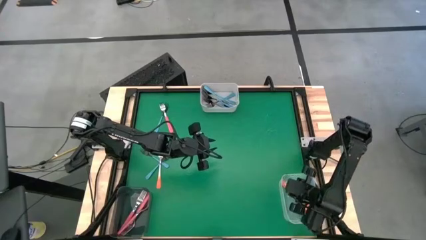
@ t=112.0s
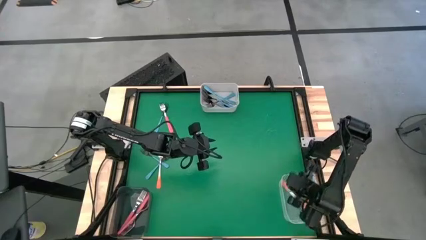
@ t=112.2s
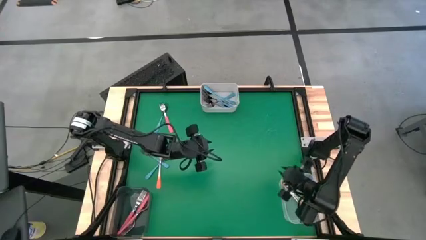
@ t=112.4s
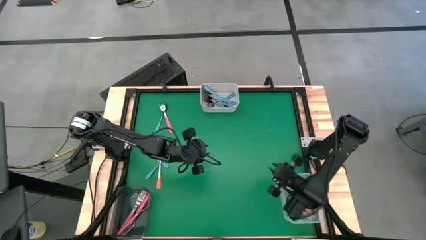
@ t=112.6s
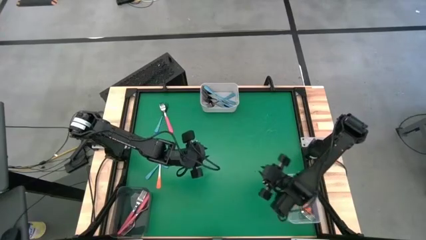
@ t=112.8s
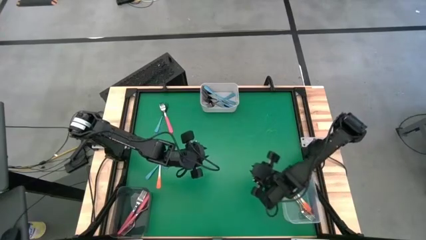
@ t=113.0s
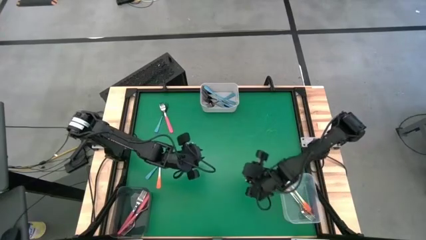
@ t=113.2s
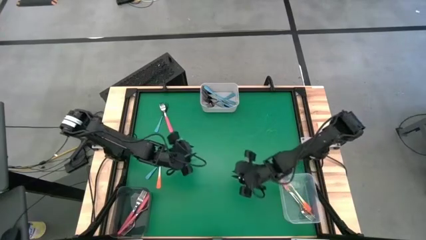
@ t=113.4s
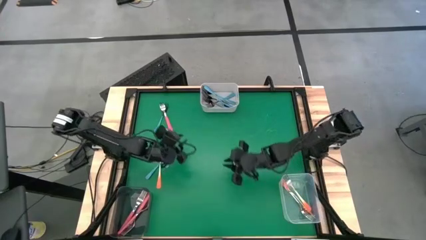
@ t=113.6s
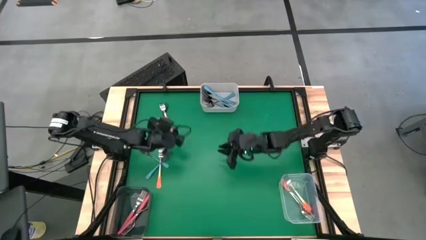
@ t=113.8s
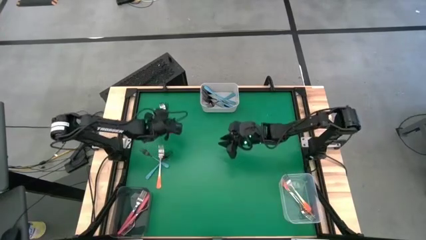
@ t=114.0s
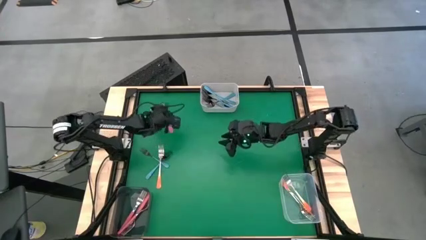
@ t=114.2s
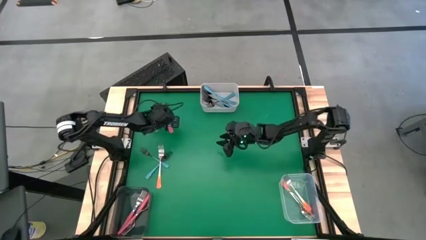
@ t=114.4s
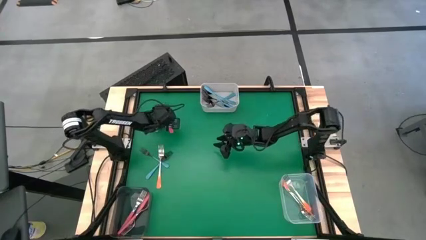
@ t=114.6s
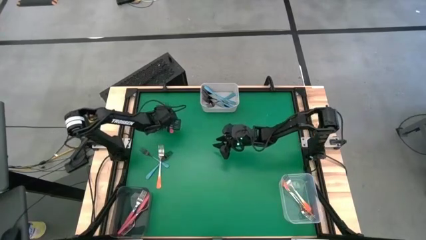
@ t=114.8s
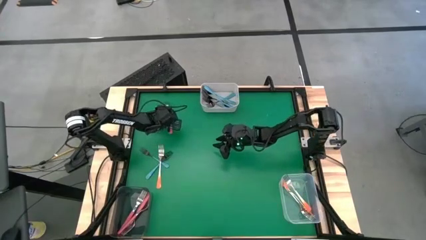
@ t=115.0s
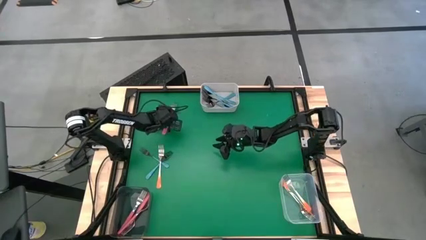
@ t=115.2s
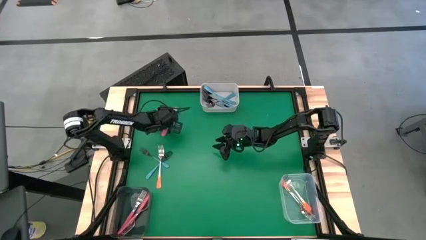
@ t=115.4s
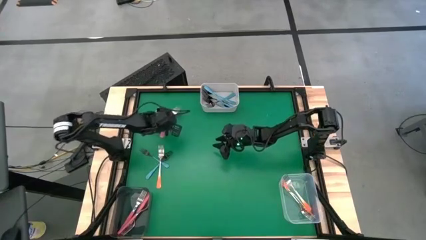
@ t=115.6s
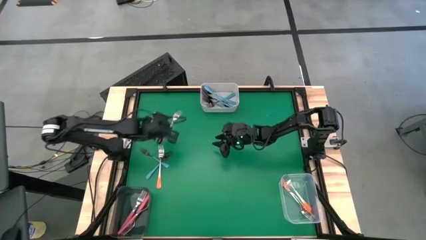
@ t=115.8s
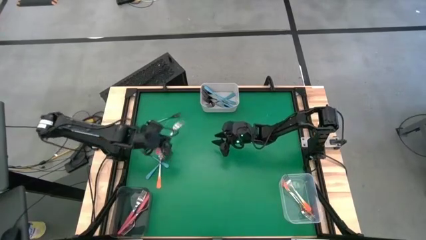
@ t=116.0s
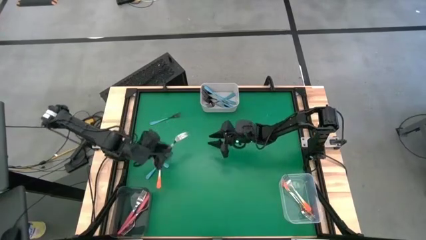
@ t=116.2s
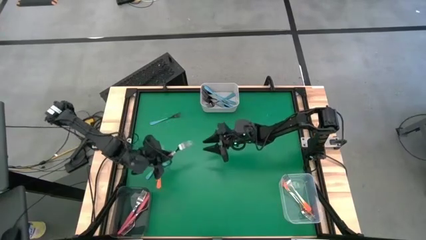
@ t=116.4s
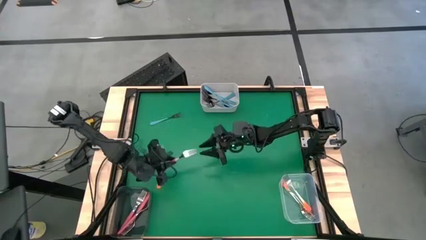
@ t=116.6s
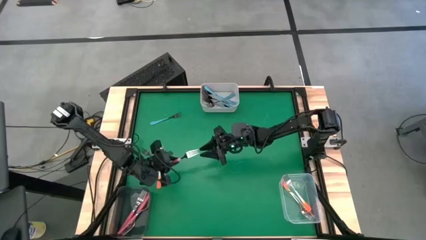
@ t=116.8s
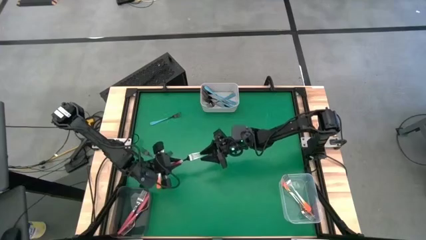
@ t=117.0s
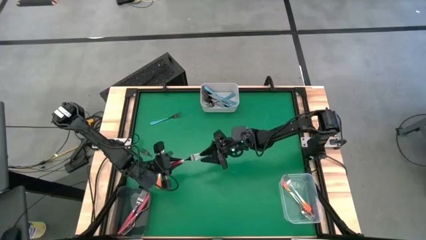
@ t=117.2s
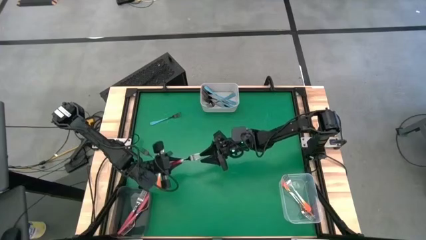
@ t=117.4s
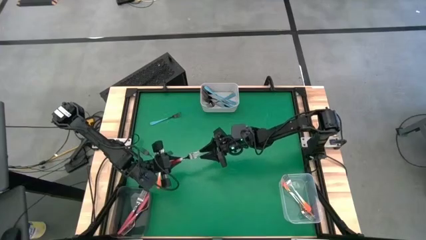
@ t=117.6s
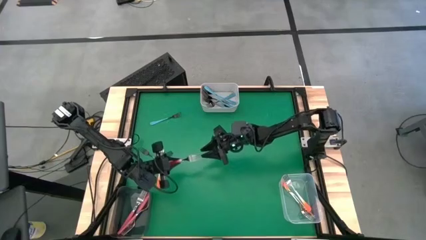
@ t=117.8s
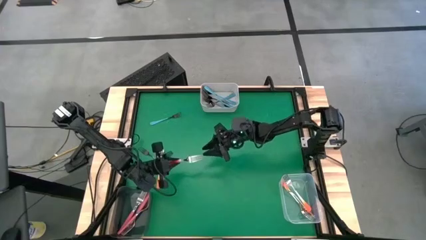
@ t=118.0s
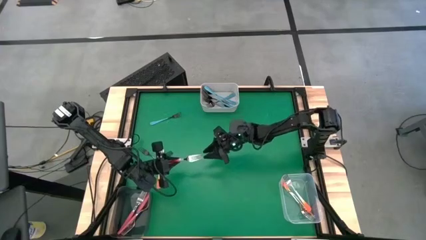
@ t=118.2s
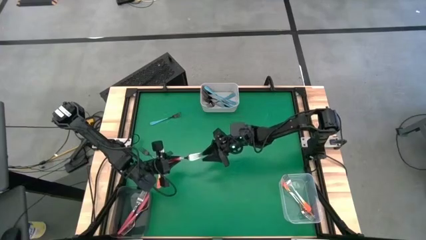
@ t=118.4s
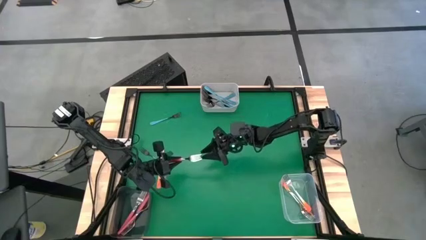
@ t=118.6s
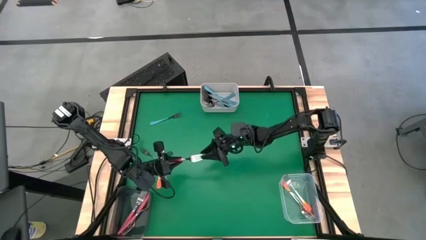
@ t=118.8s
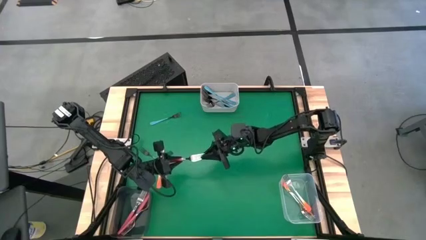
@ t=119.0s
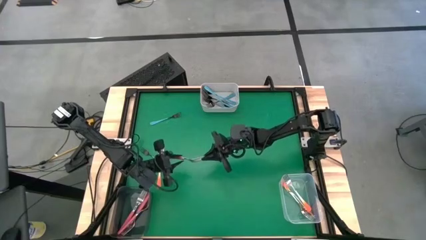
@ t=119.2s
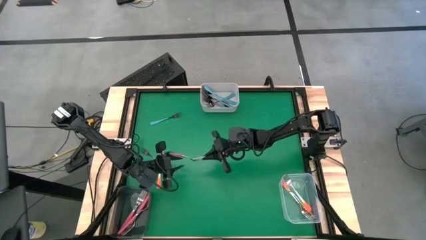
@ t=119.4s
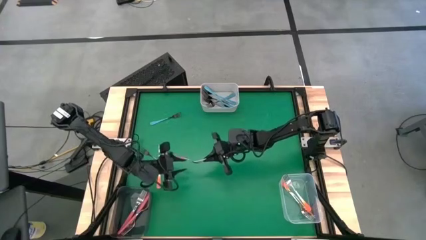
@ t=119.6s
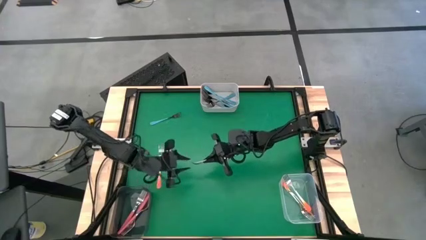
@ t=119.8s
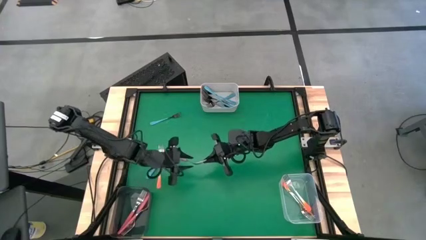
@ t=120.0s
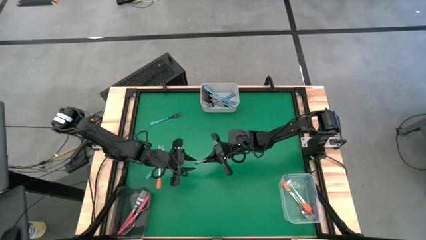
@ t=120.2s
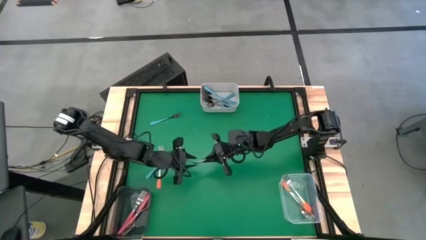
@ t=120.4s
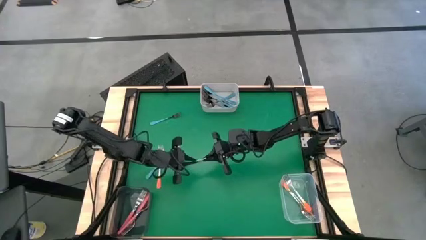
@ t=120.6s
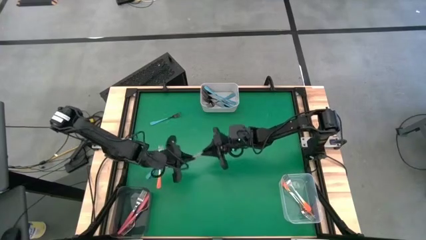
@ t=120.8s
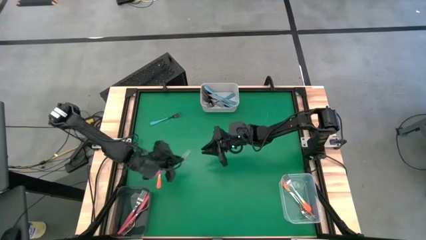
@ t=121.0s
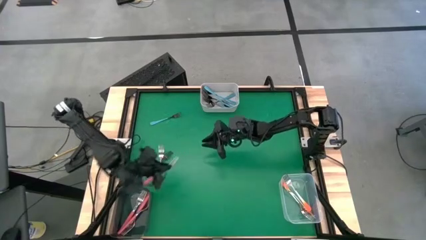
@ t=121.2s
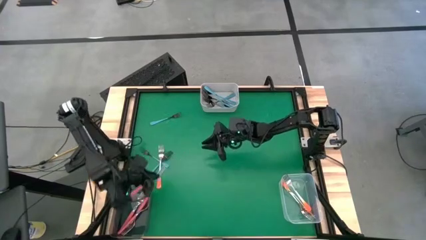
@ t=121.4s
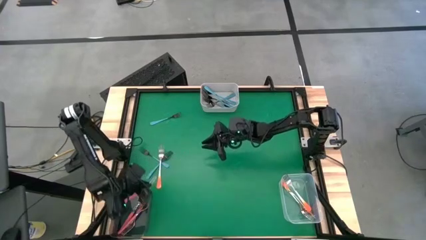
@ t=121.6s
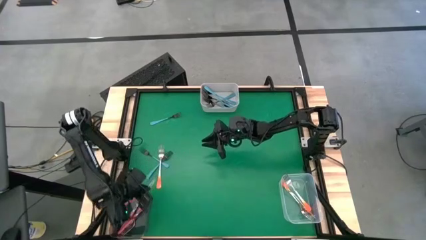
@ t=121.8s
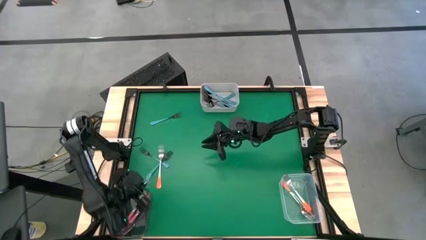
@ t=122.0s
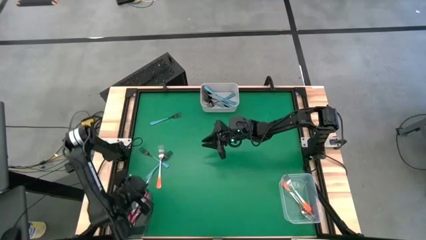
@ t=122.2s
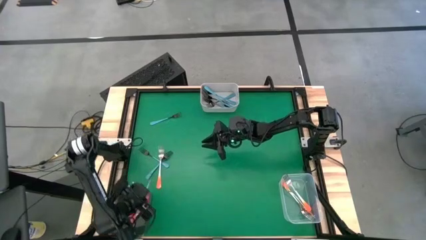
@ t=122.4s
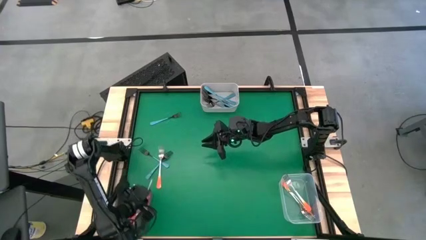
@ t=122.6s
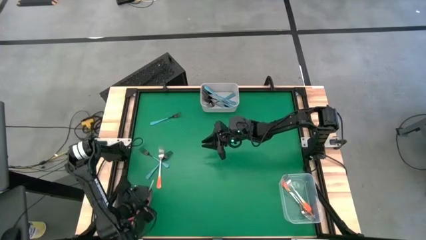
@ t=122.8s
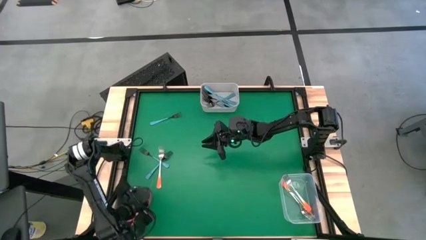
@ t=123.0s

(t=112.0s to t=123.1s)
Task: Sort silverware by color (type)
Put the pink fork into the black bin

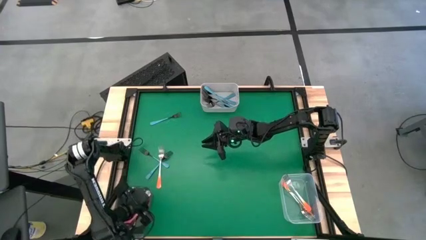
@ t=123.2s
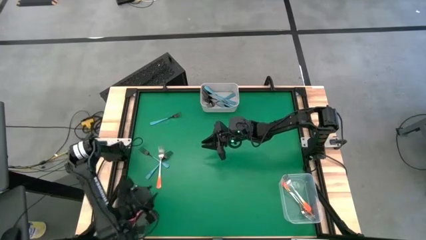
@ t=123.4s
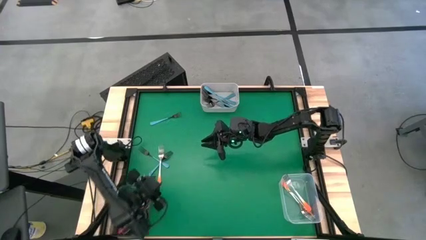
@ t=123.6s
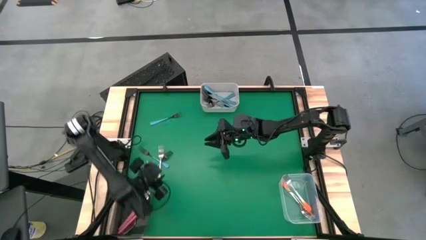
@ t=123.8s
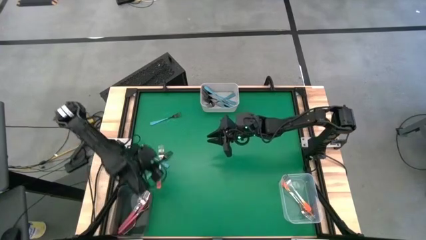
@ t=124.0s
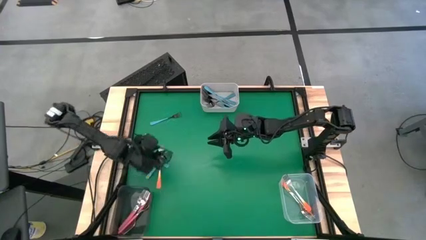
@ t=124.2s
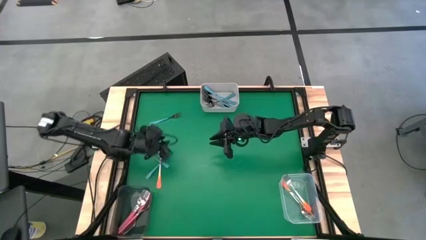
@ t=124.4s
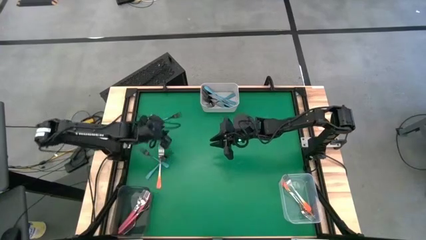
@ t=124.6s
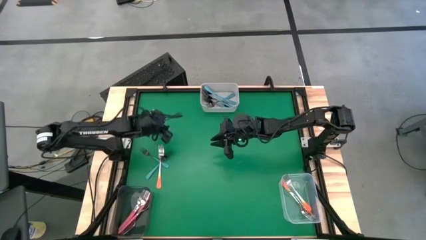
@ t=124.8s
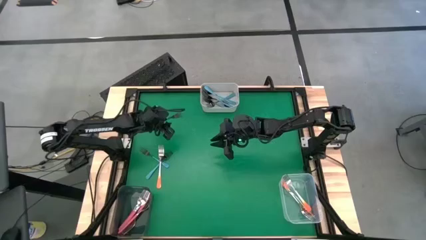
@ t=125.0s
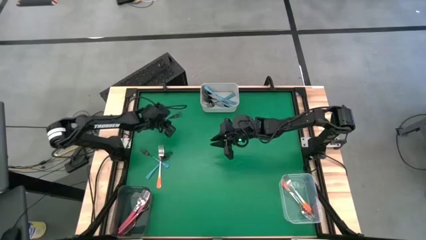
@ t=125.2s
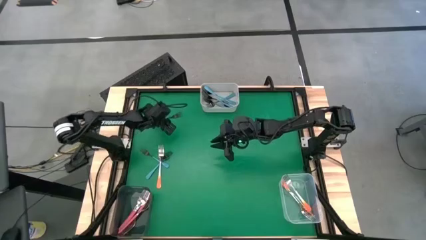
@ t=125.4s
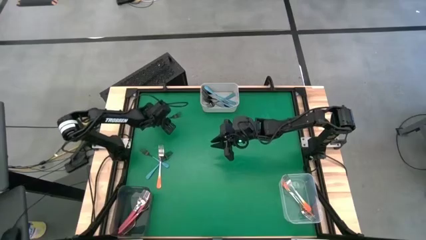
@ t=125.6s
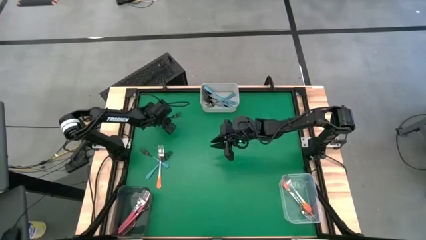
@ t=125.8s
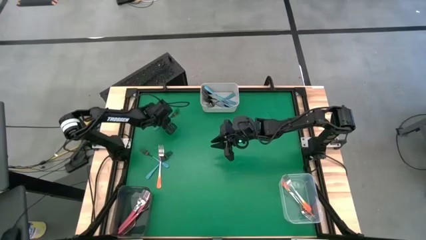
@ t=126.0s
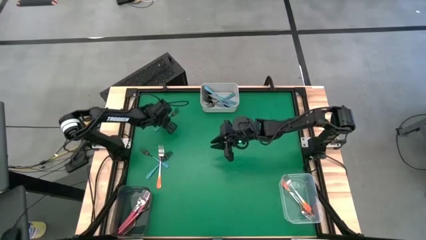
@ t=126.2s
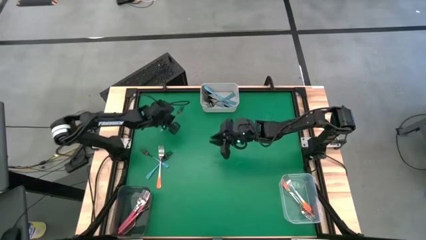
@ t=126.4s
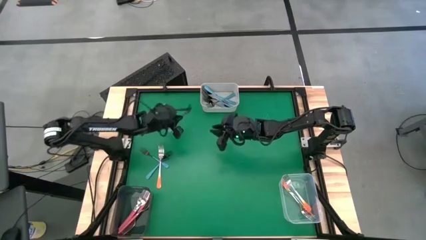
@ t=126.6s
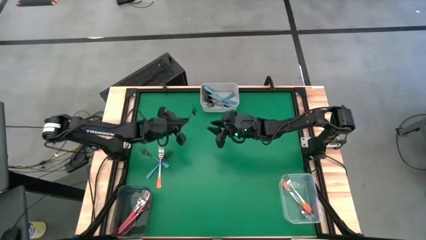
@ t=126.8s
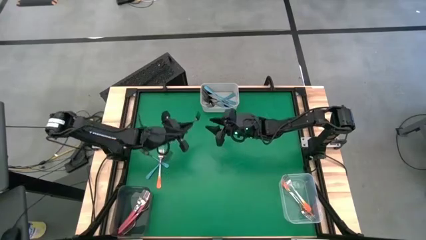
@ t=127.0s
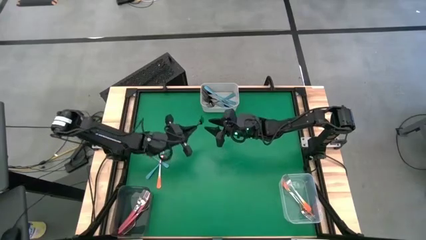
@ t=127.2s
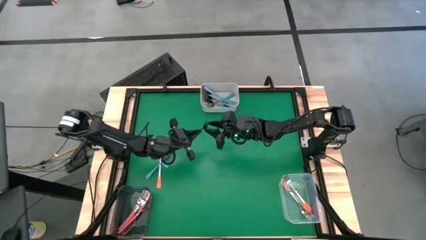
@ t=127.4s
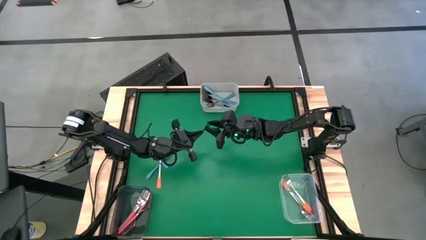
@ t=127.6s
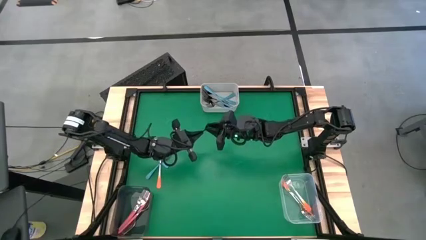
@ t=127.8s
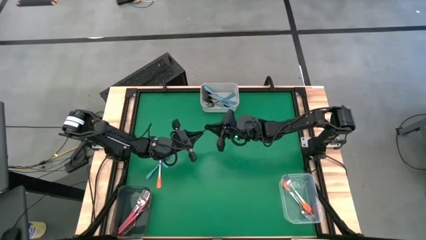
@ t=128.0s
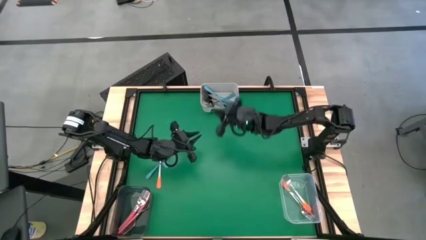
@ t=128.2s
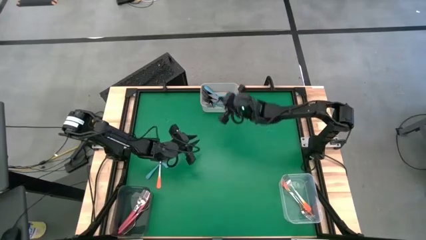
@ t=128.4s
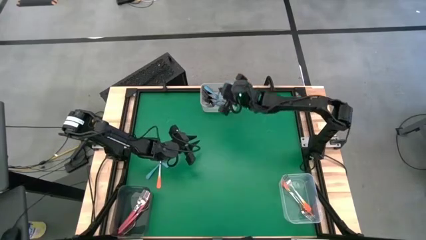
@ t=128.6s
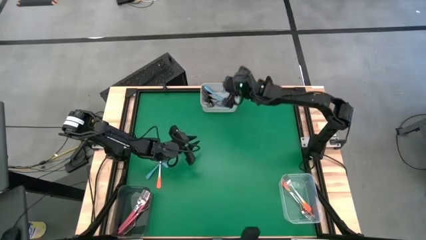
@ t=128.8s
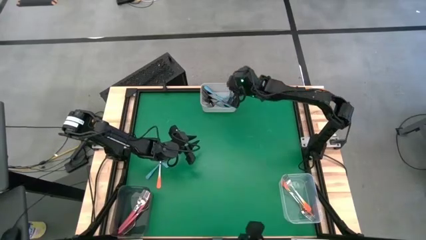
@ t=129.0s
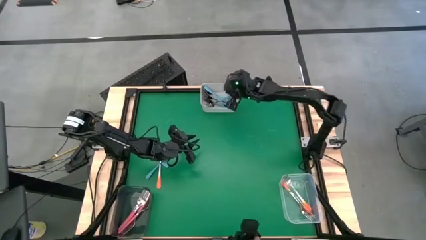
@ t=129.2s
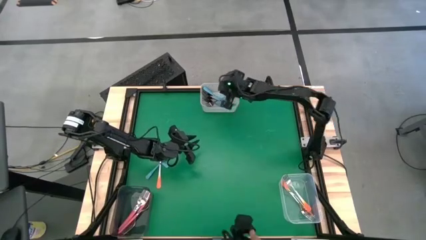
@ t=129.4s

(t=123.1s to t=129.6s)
Put the blue fork into the white bin
